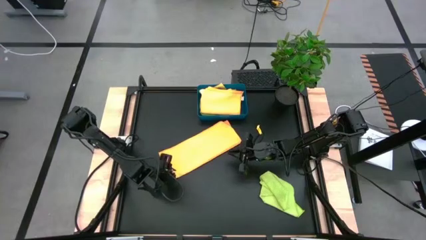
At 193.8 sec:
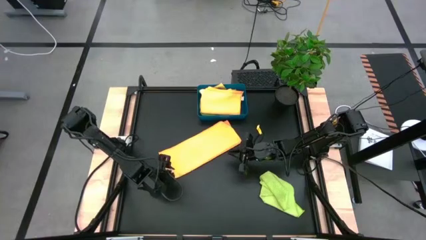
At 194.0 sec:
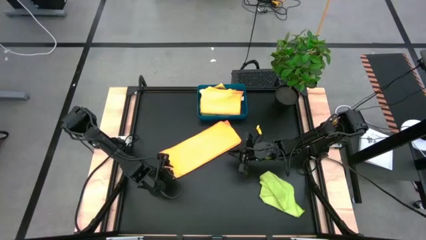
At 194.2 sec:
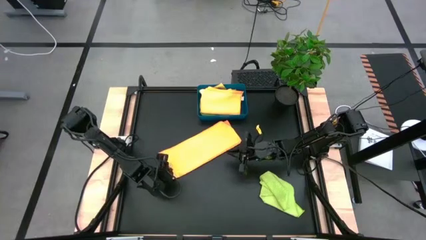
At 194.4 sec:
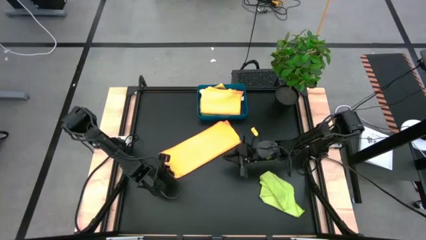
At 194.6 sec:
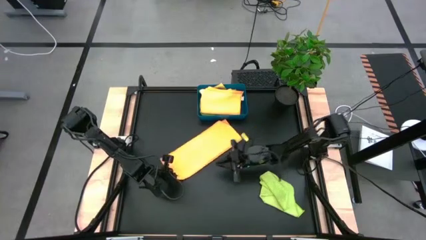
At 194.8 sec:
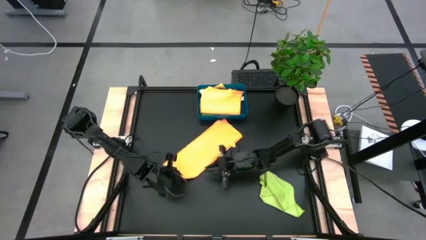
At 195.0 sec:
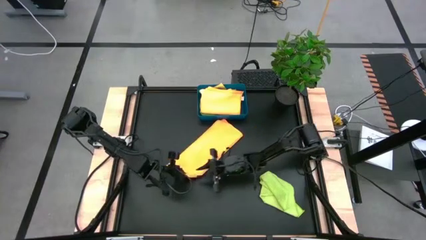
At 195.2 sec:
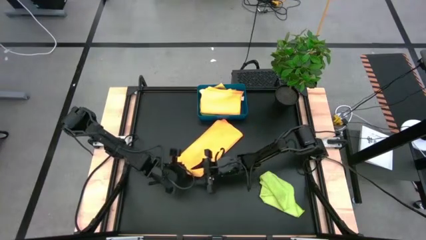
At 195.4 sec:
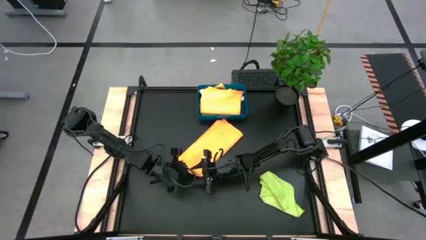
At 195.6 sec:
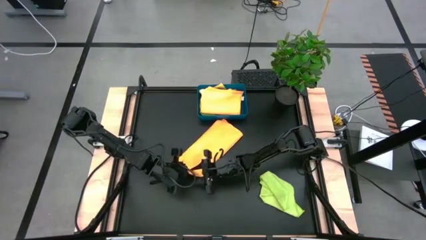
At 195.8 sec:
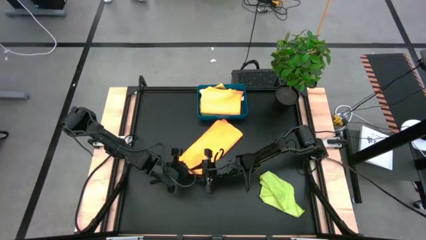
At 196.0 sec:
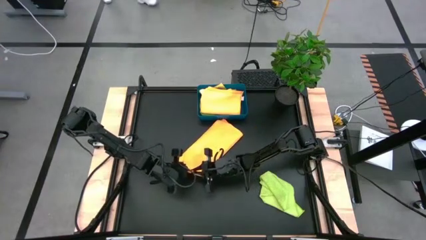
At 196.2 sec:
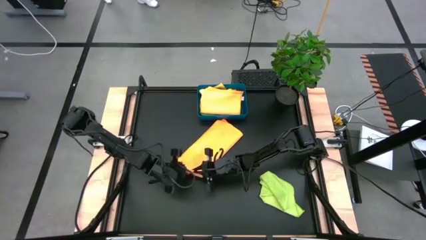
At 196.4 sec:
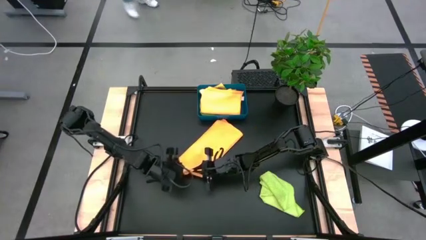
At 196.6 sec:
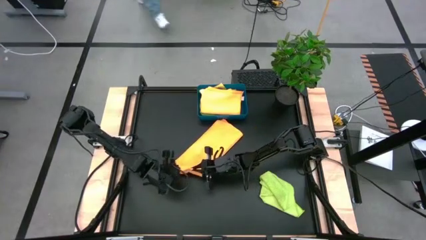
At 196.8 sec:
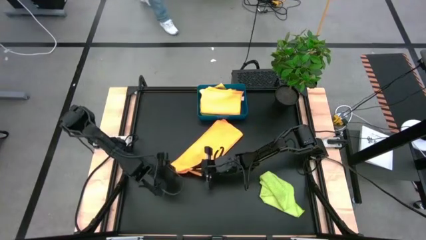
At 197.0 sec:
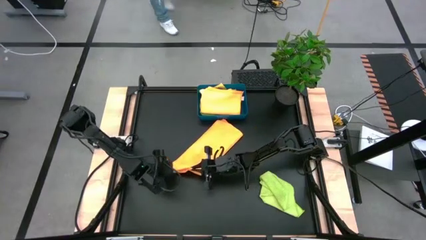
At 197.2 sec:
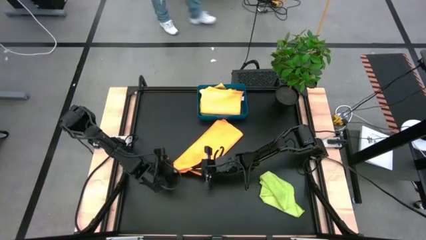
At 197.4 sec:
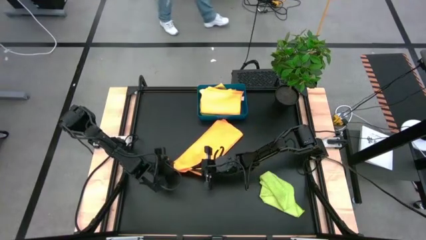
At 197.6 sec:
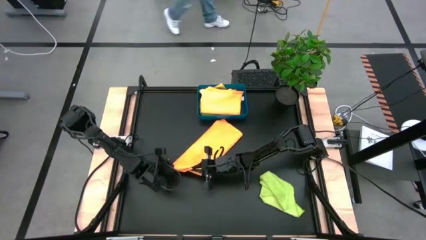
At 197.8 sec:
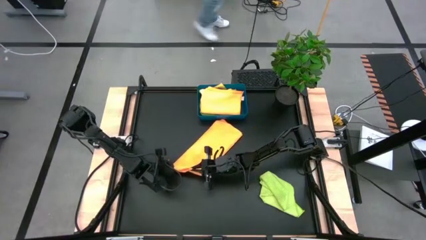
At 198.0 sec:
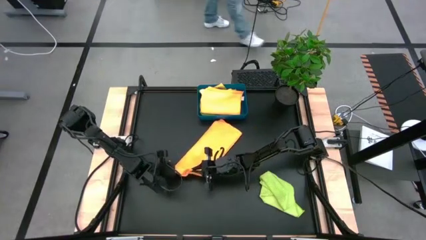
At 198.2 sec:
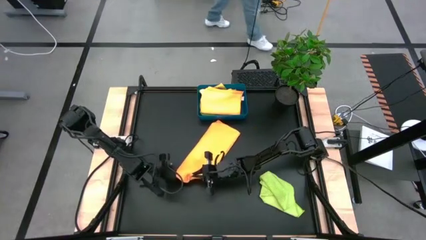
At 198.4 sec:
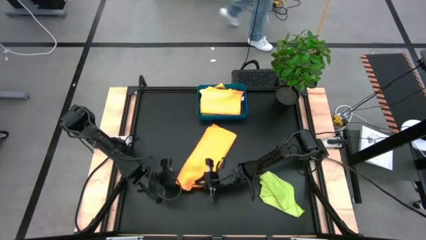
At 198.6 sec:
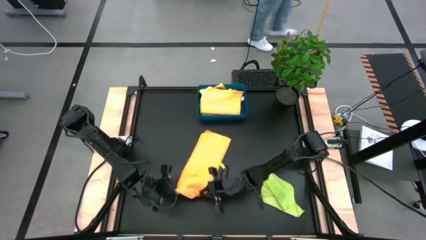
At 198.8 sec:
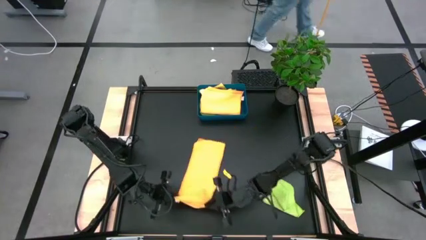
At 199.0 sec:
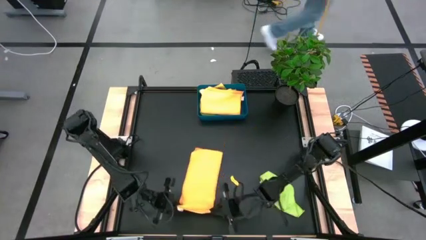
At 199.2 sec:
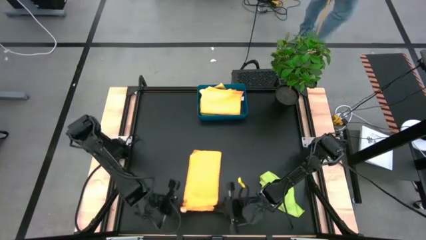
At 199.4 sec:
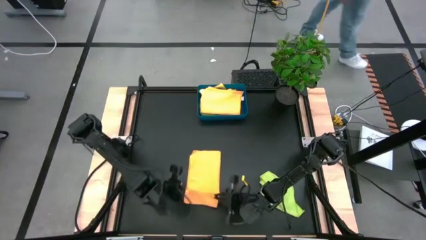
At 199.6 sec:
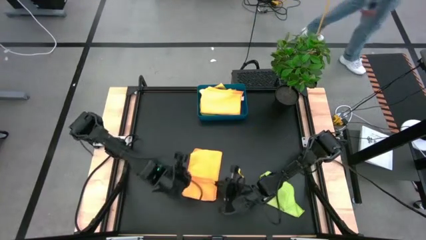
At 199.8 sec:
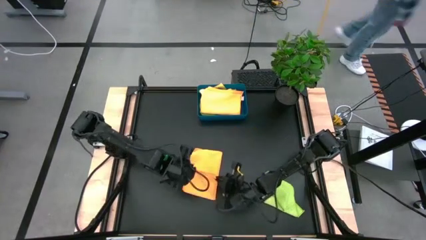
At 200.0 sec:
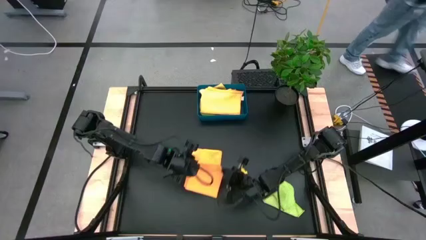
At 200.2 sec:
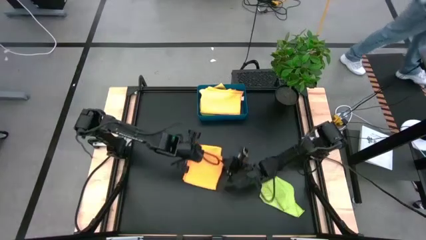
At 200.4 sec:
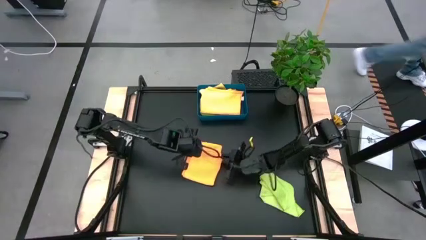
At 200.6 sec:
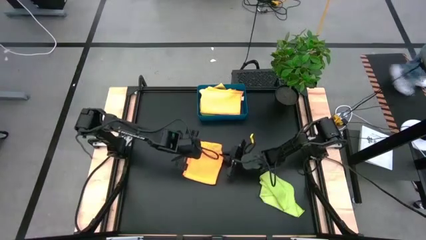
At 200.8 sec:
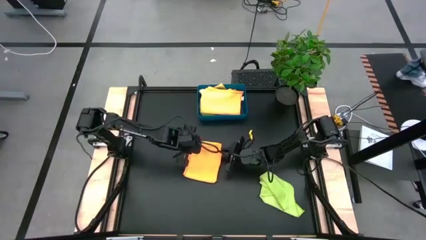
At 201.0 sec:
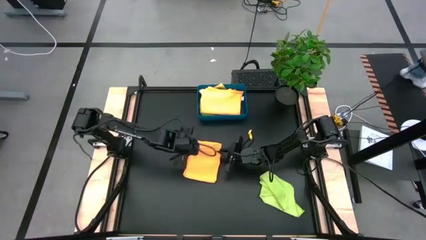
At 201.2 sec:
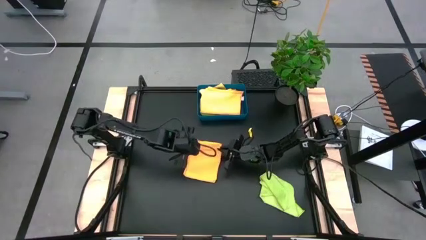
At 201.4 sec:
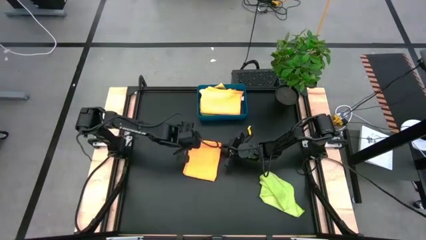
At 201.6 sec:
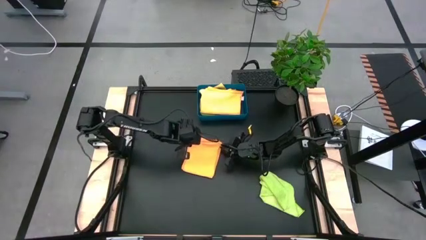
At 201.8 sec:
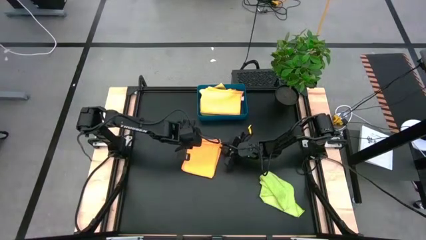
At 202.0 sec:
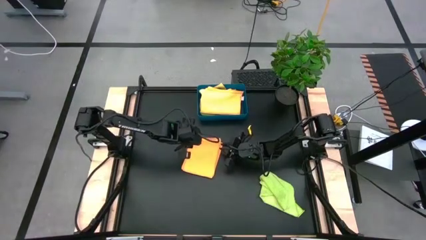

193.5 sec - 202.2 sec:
Task: Fold microfiber towels
Fold the orange microfiber towel

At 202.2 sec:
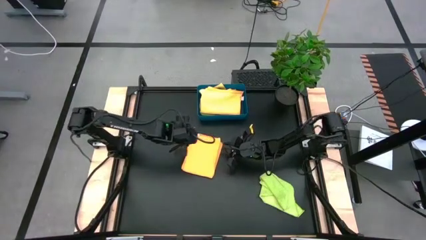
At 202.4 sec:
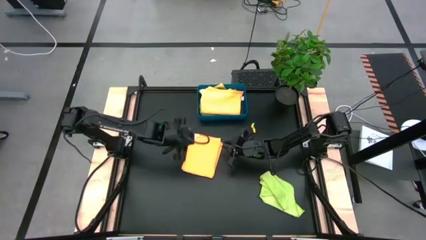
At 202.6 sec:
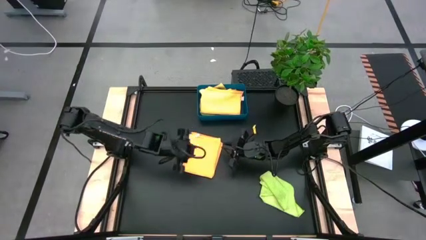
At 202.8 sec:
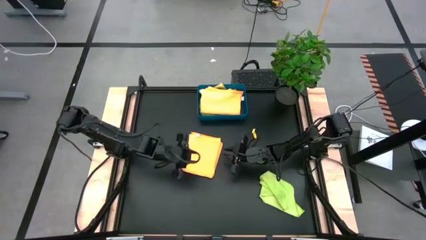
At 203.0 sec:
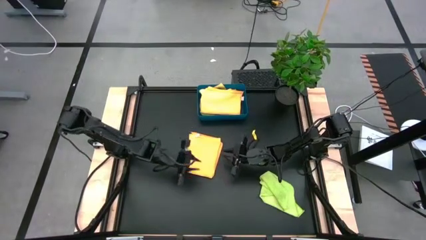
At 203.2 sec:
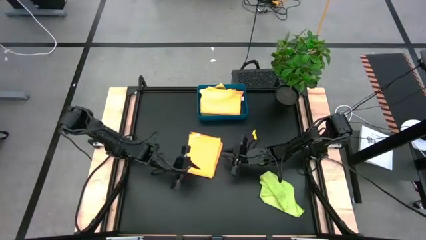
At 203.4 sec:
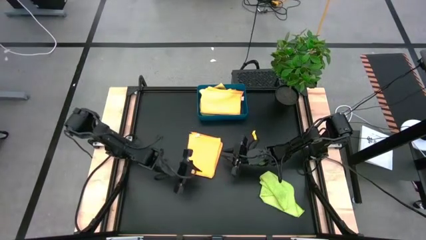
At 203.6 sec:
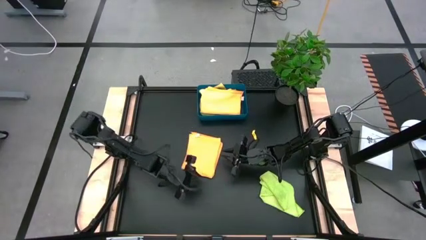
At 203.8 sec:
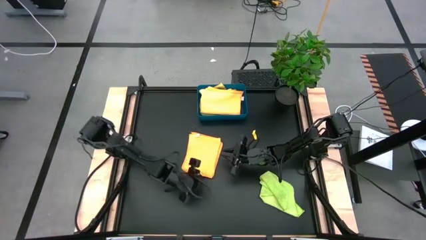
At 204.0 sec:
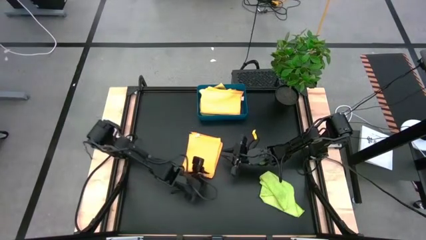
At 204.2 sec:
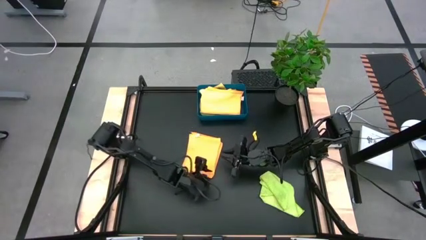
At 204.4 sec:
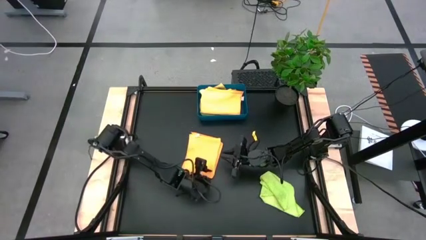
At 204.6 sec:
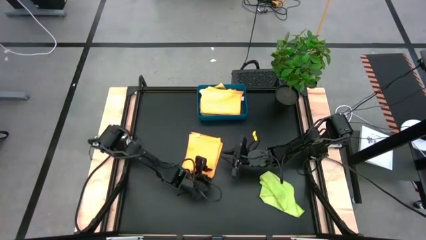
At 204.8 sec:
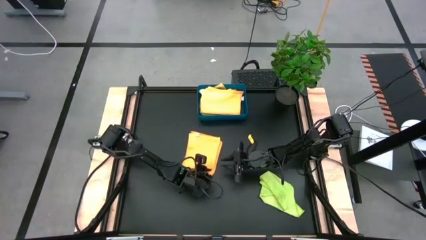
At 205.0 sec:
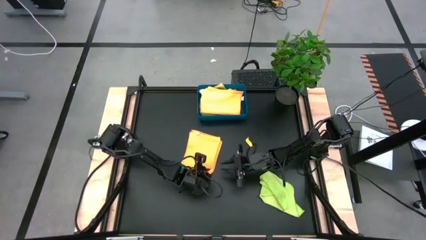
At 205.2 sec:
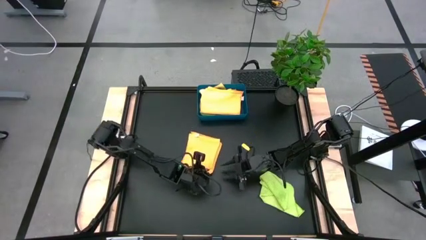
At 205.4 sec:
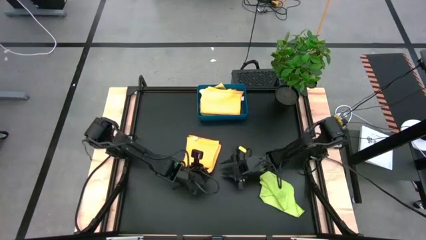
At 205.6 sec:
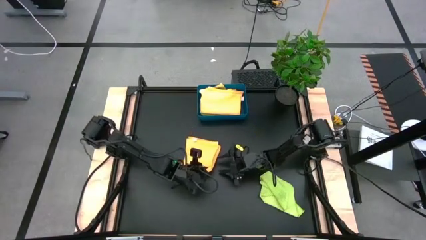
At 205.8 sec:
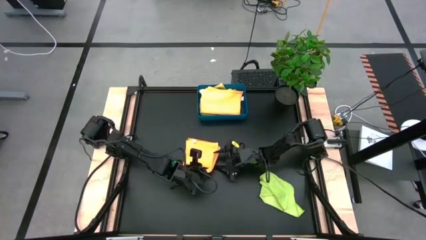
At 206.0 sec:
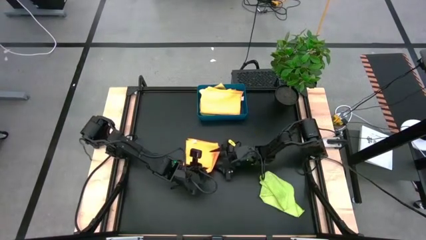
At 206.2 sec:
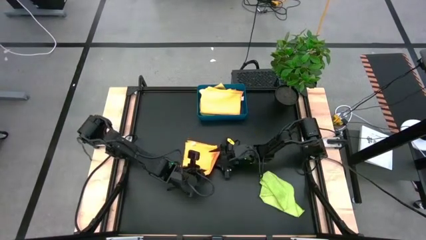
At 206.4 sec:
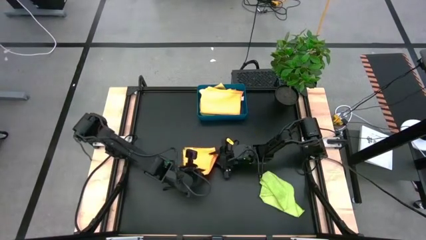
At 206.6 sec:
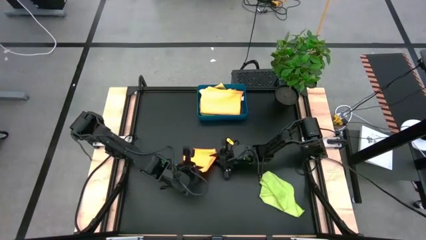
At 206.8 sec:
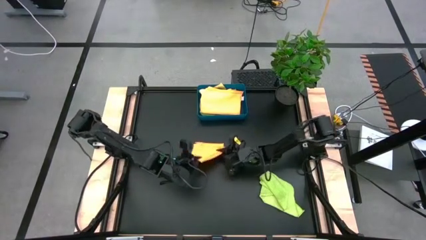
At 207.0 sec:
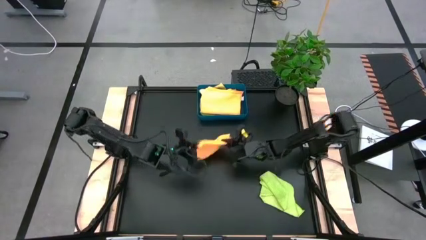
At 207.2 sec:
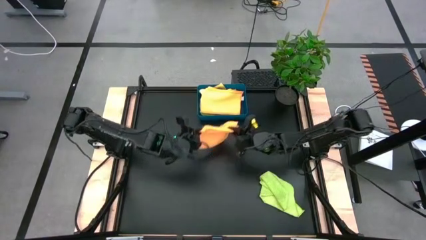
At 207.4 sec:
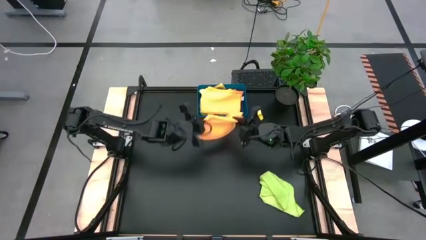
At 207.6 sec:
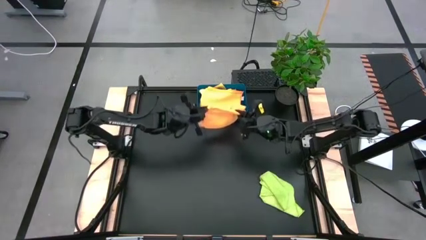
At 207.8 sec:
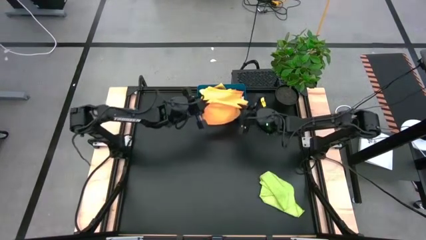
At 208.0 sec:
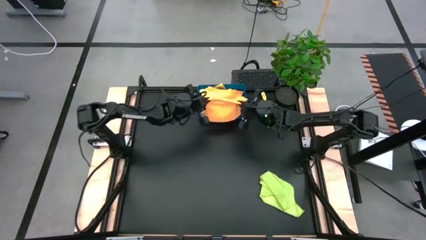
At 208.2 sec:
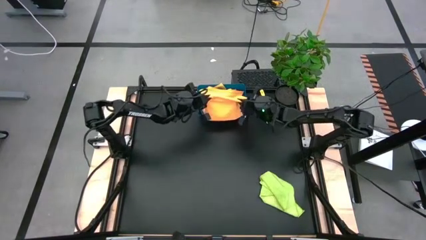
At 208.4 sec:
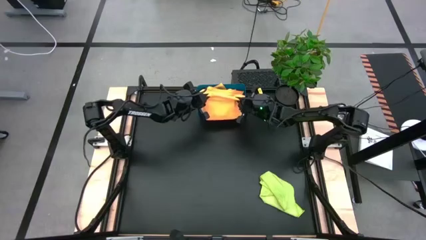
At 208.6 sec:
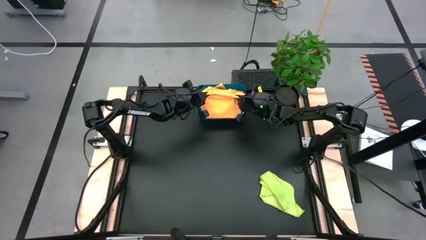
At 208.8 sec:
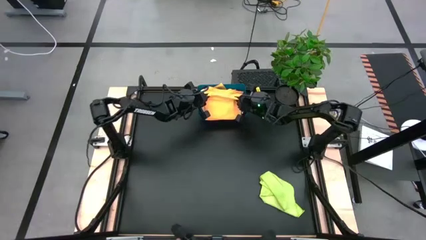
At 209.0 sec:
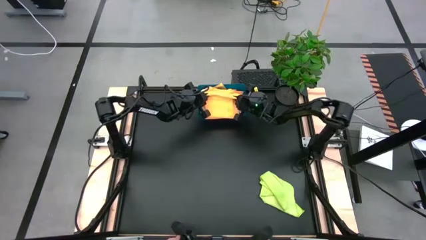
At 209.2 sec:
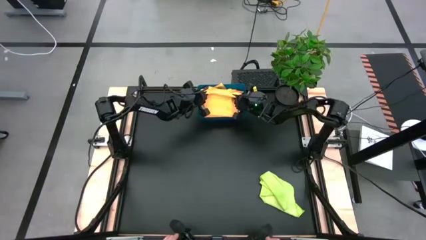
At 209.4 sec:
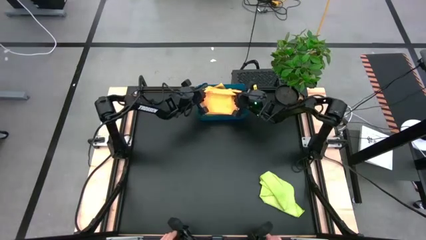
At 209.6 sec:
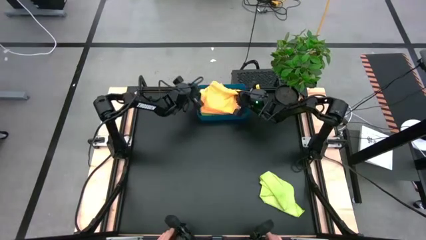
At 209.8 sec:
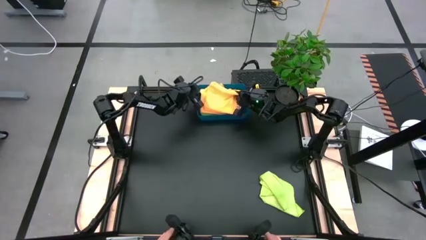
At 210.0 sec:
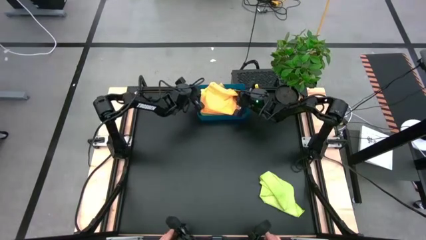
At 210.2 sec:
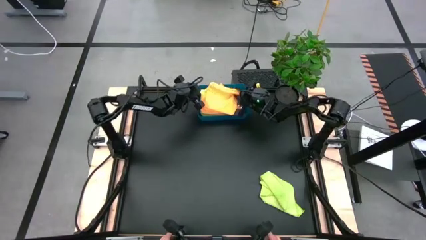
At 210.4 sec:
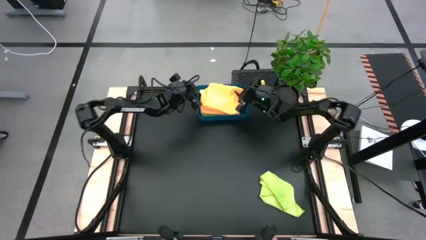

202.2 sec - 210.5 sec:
Stack the orange microfiber towel on top of the orange microfiber towel in the bin
